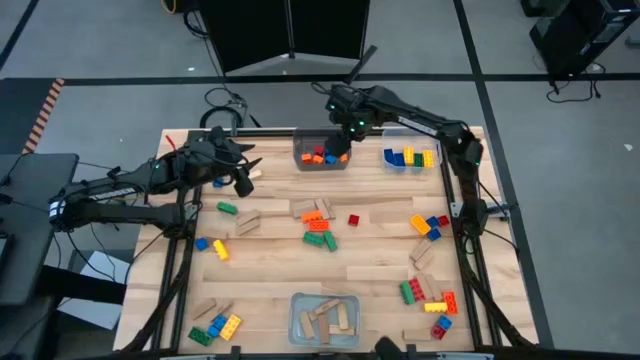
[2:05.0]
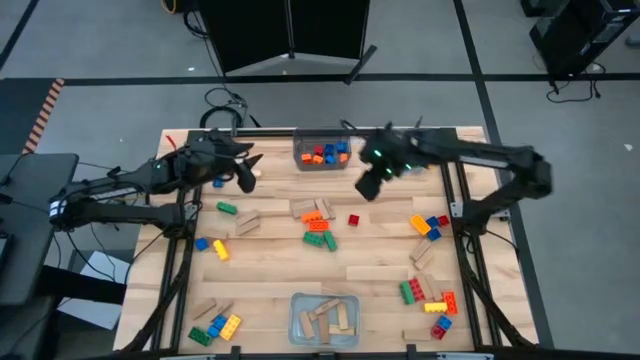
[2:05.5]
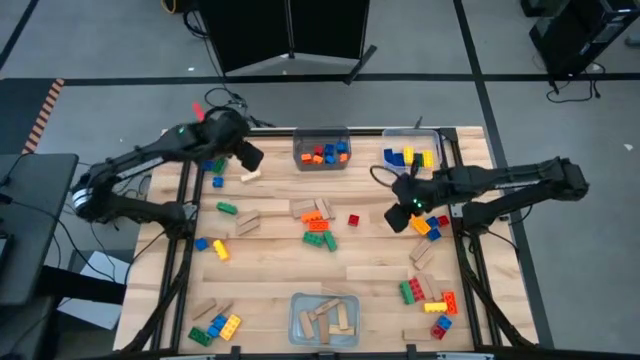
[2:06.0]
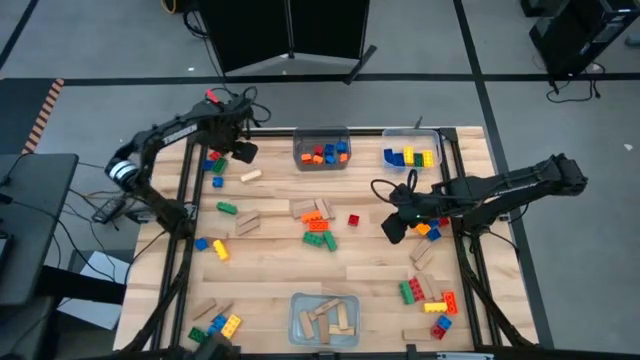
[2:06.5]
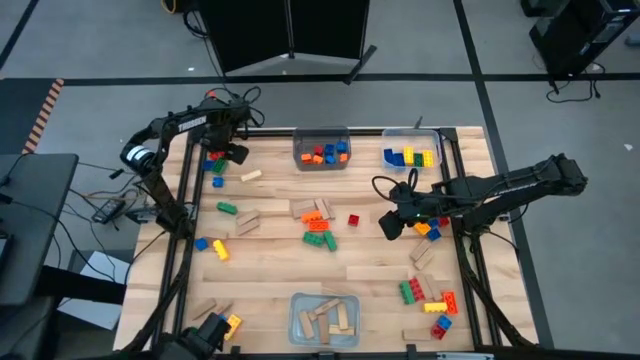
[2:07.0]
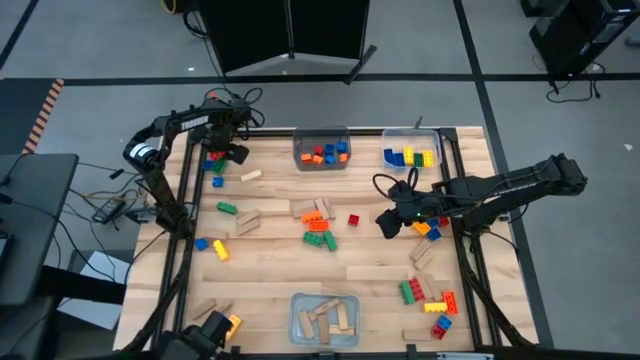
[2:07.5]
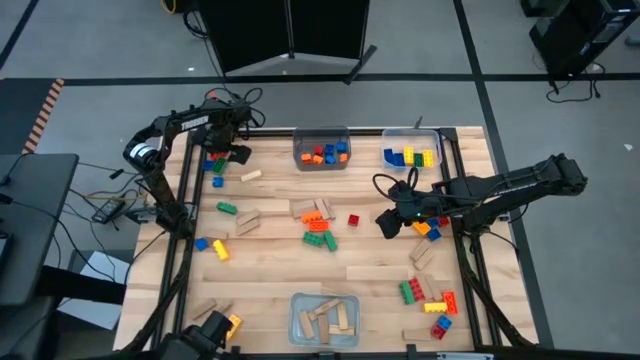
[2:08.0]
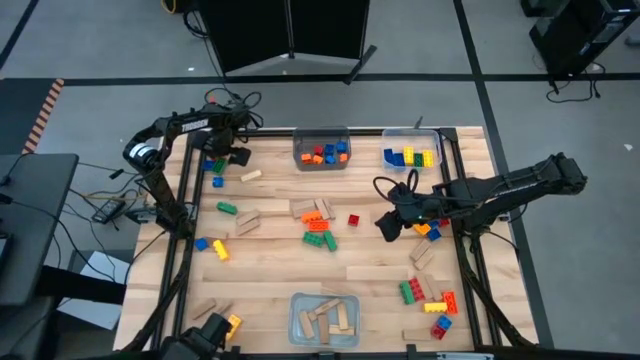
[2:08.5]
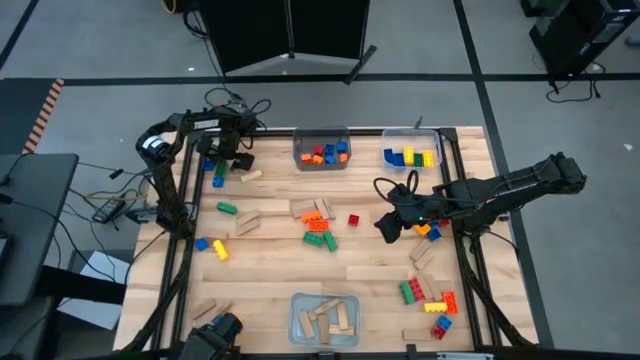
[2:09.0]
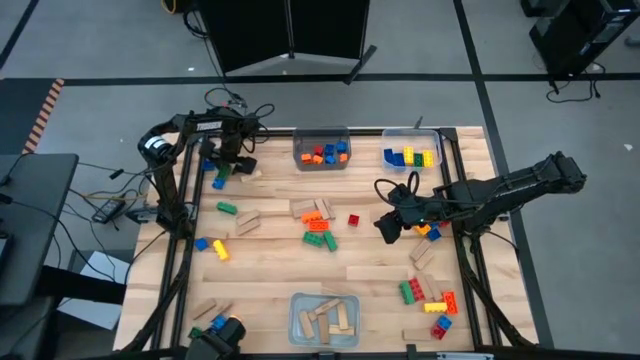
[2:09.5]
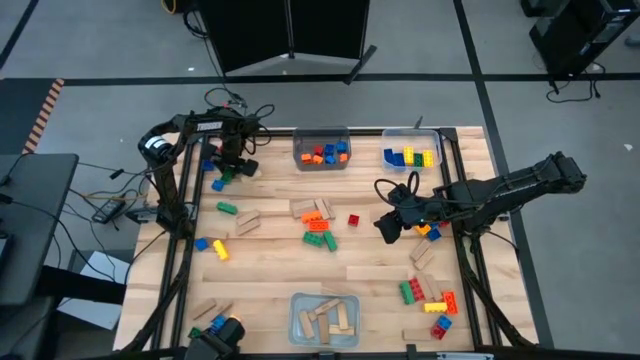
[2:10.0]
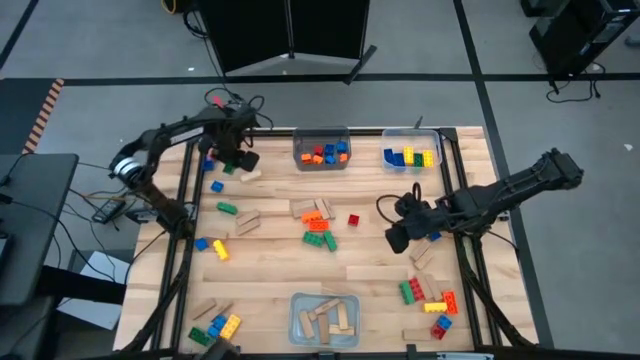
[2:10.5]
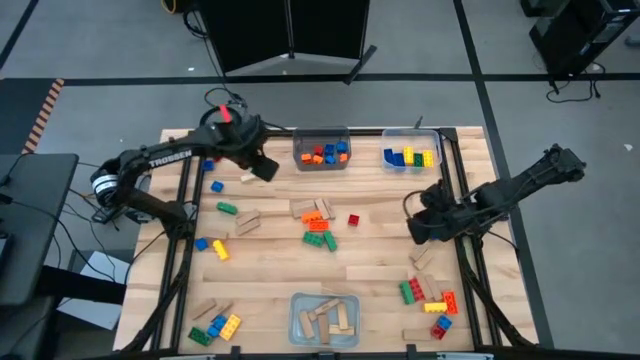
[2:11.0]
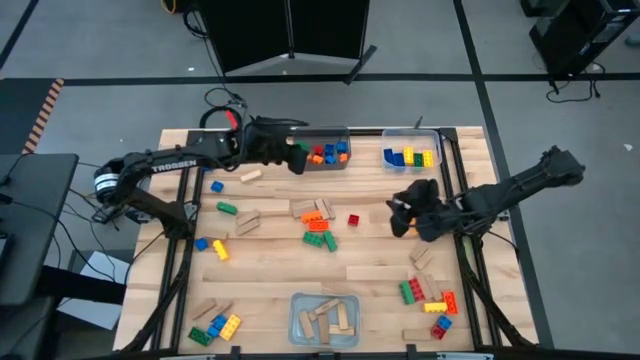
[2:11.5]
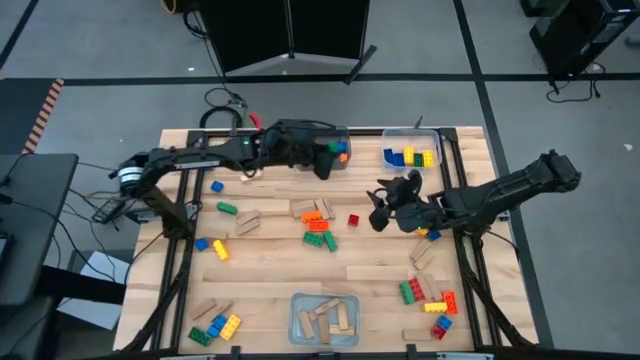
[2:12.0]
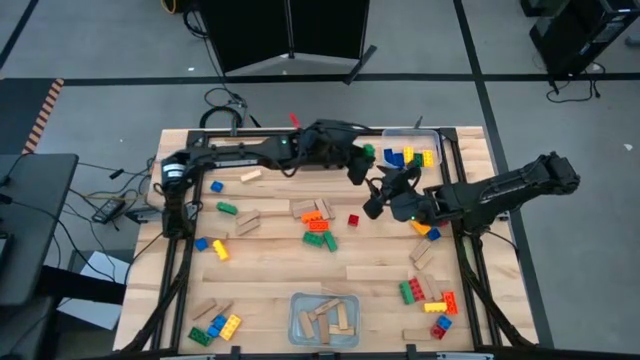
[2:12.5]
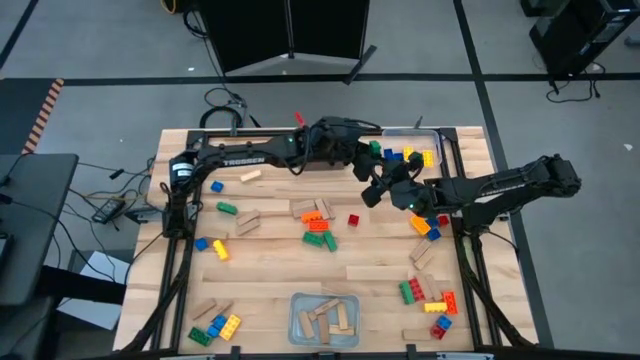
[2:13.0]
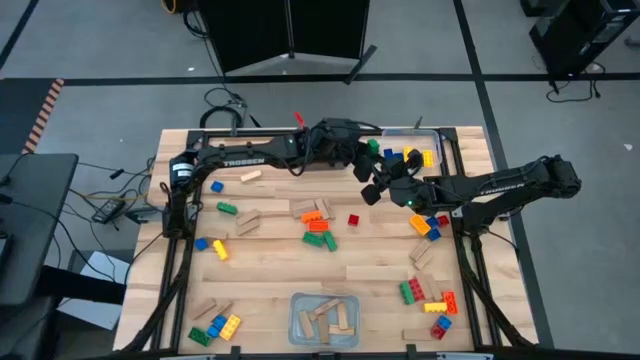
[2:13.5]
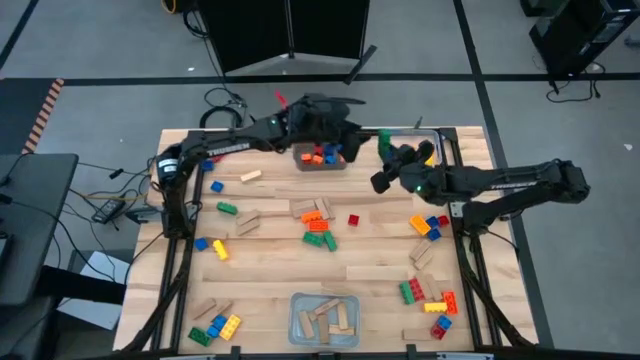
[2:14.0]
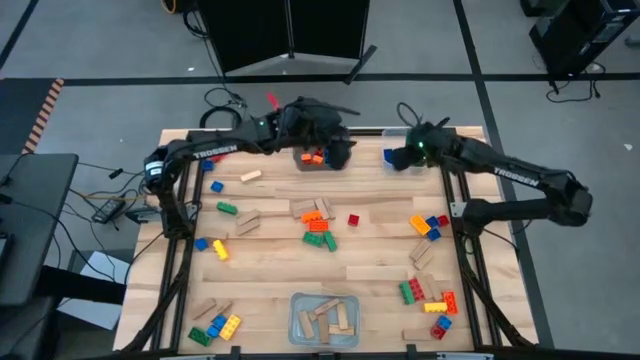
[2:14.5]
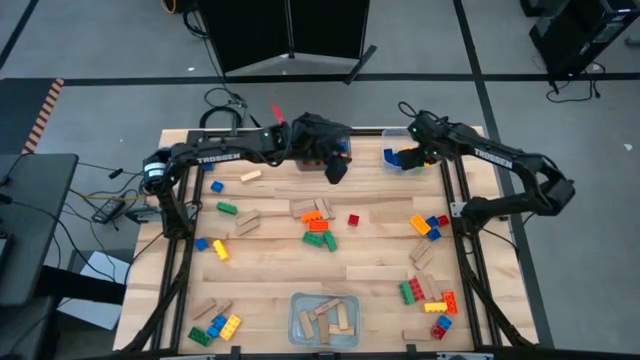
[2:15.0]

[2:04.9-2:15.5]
Task: Sort blocks by size
Put the large green game piece into the transparent bin

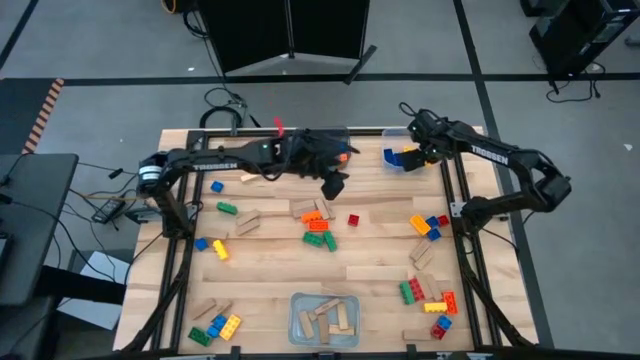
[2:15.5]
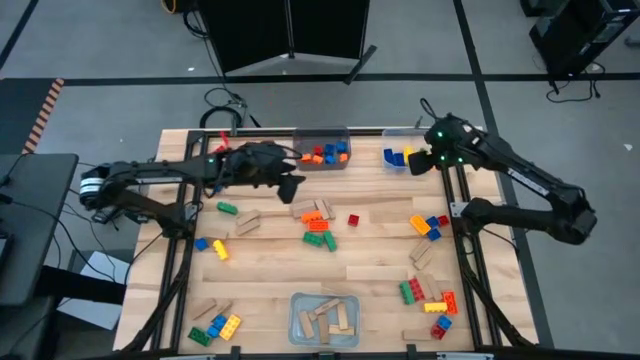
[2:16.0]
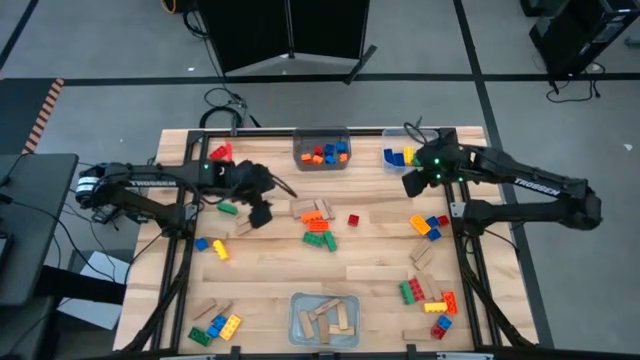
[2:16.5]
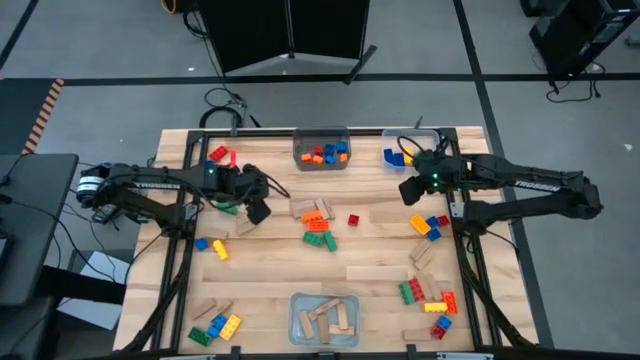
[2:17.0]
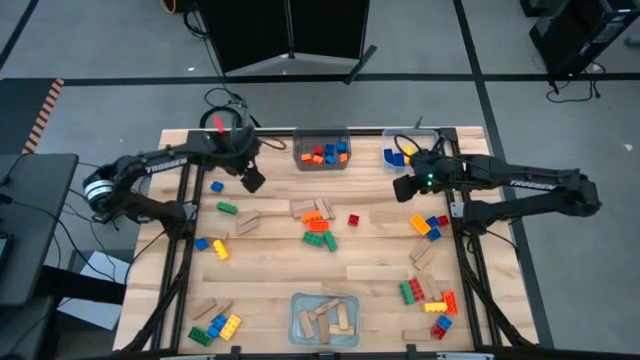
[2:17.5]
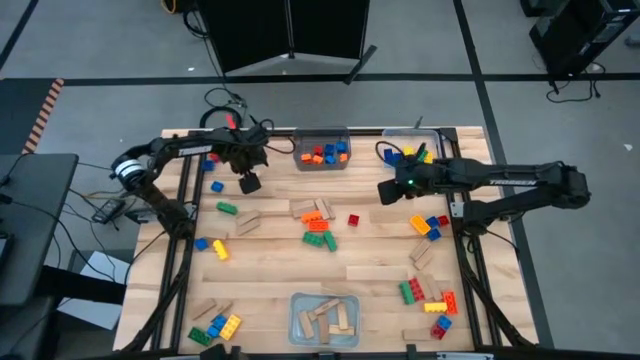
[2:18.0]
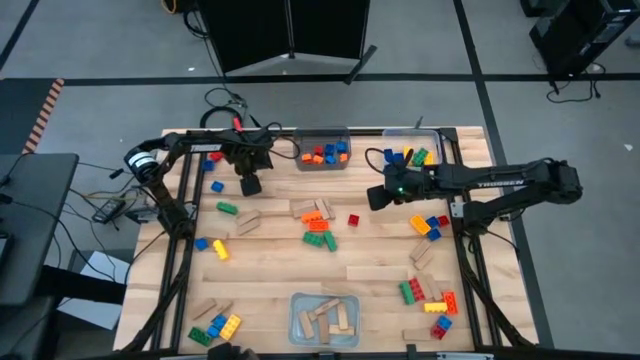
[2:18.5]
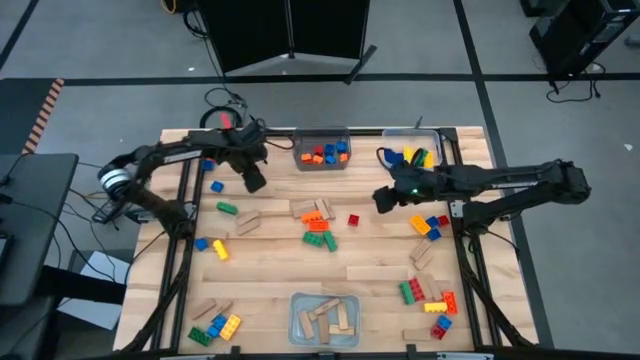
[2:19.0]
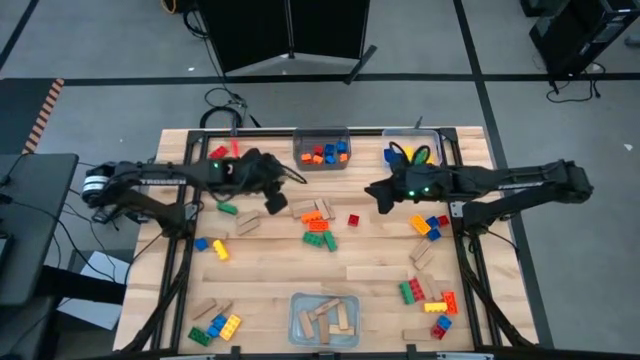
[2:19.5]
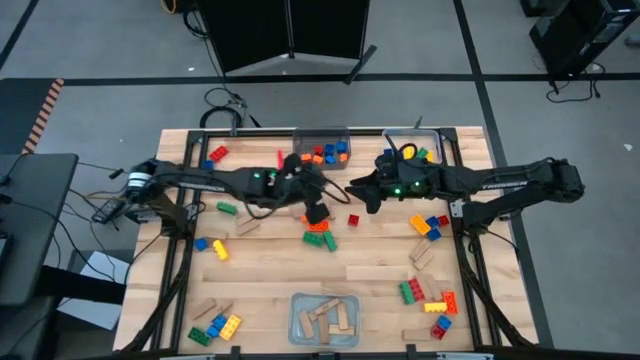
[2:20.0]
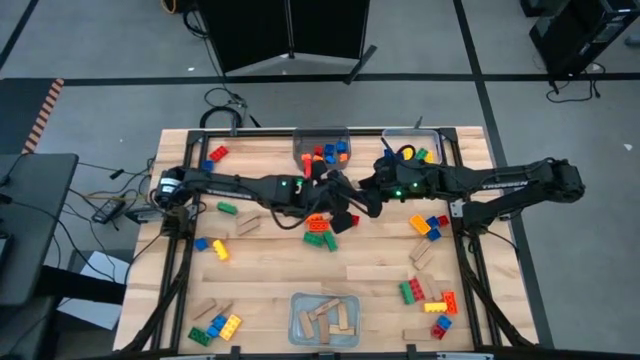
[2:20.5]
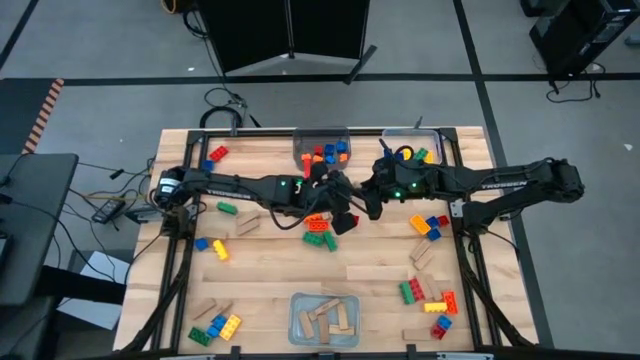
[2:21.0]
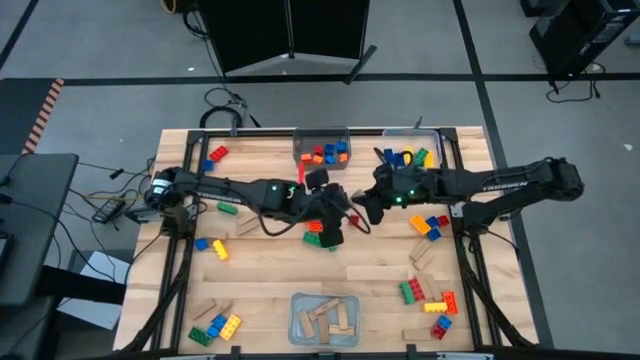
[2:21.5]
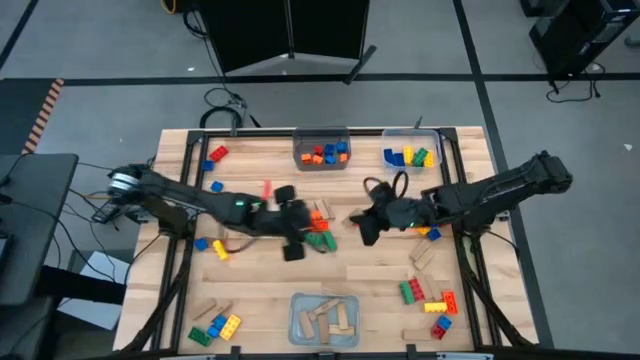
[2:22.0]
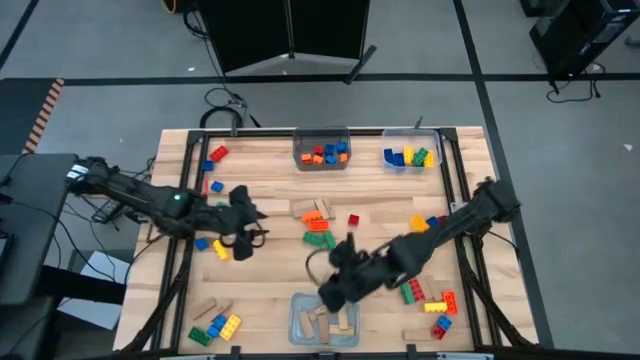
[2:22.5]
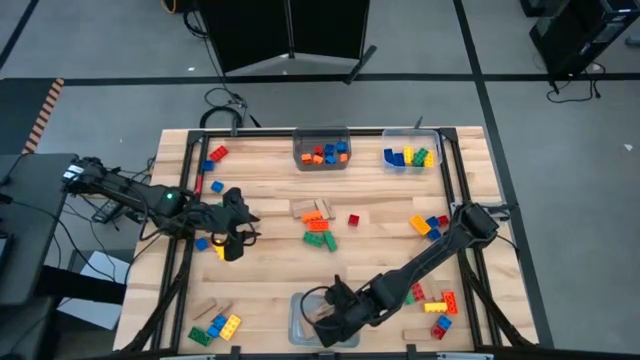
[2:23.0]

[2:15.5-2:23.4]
Put the brown block into the gray bin

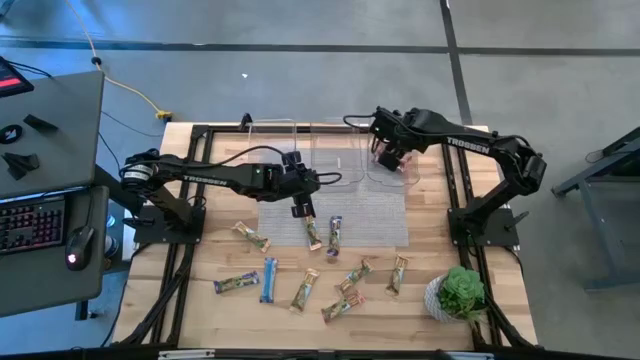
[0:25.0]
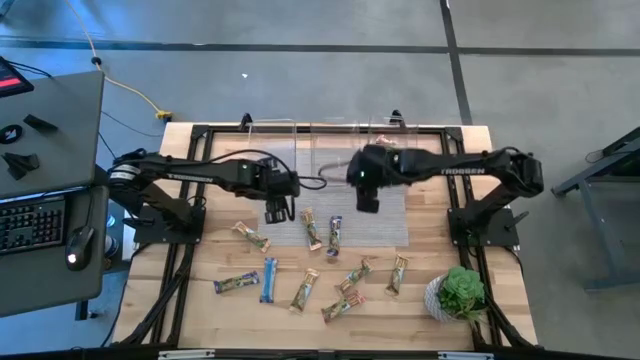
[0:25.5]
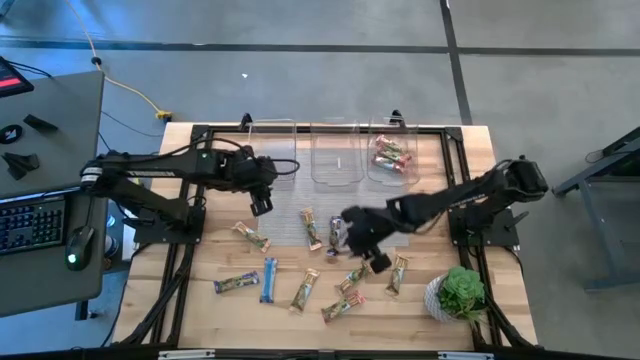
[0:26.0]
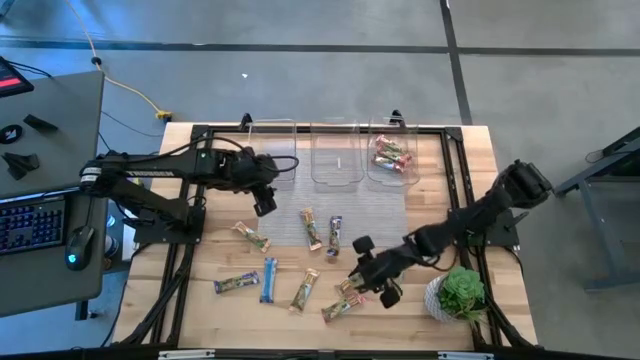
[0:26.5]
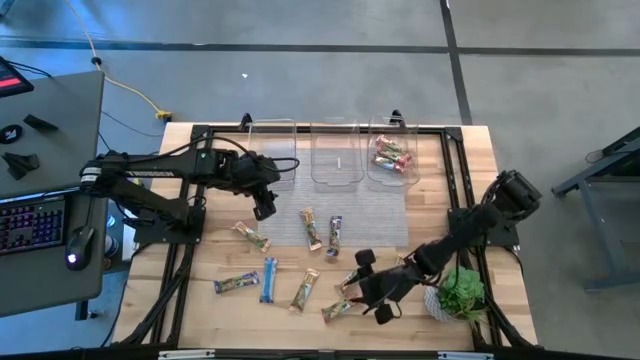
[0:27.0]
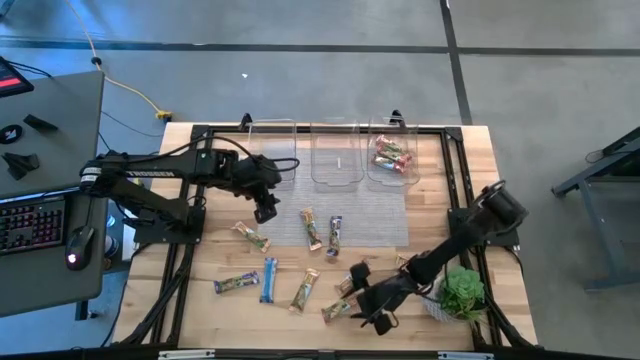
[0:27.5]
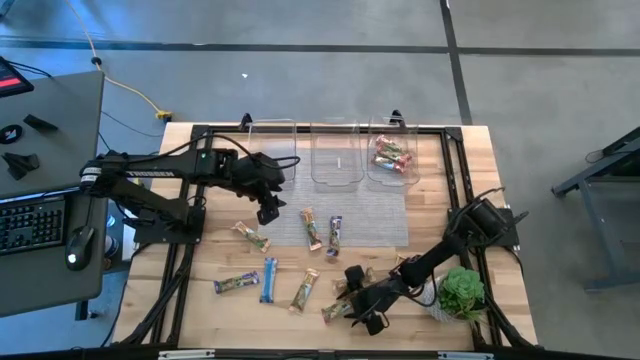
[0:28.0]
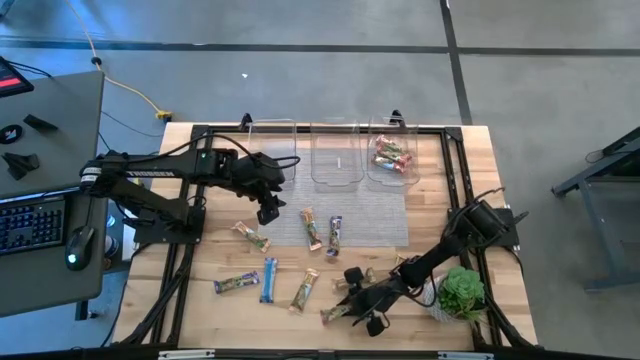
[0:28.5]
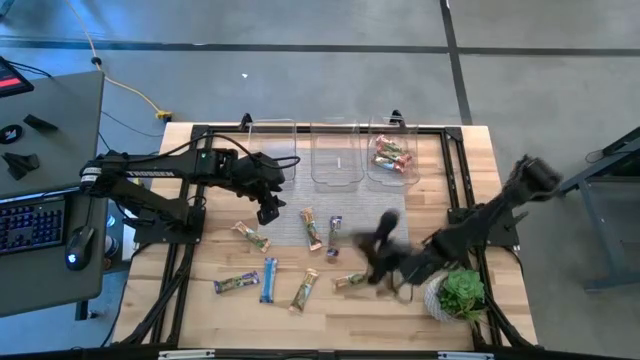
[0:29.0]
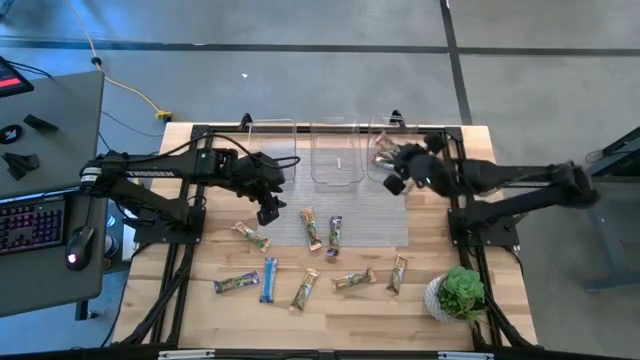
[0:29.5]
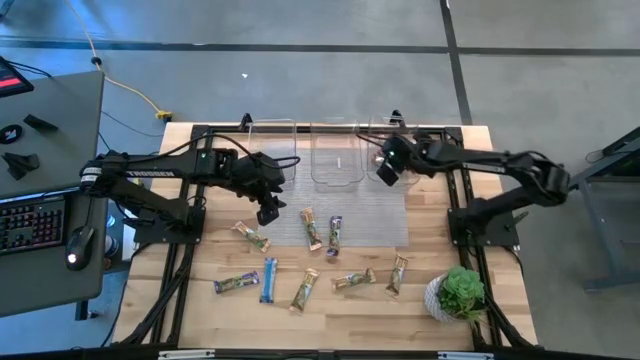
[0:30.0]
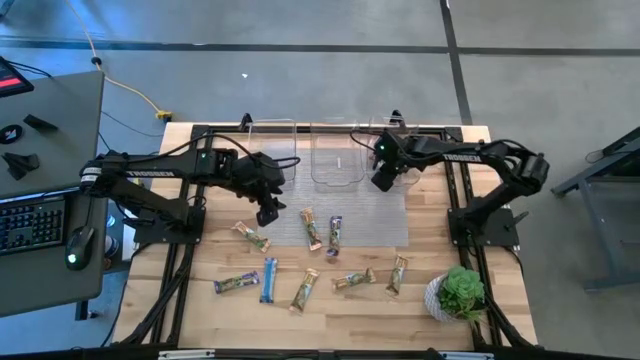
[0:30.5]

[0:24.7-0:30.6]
Task: Pick and place Granola Bars by type
Put the red granola bar into the right transparent bin
